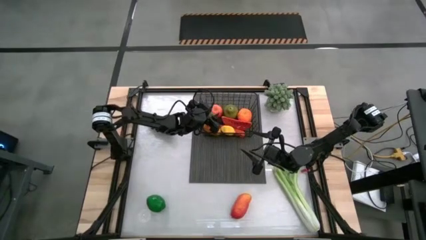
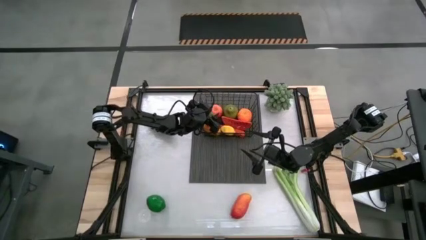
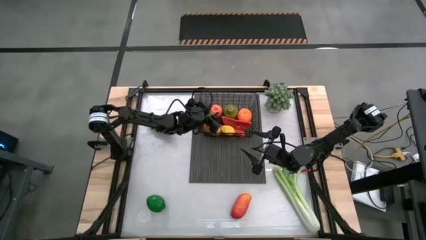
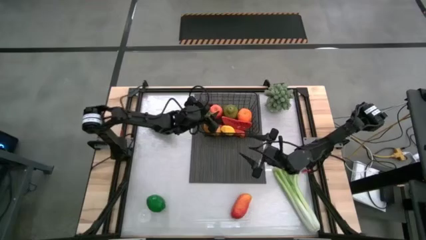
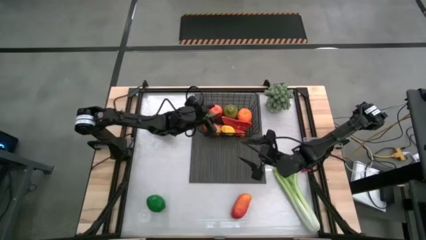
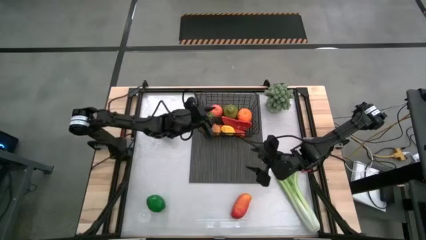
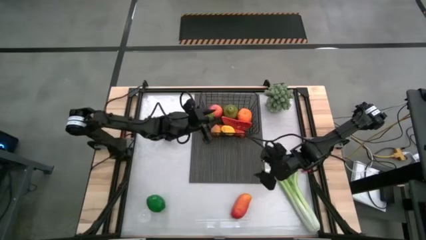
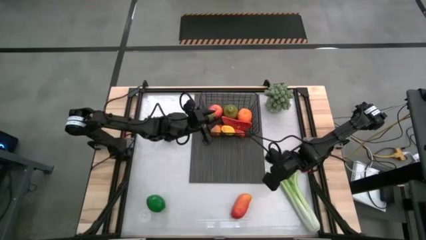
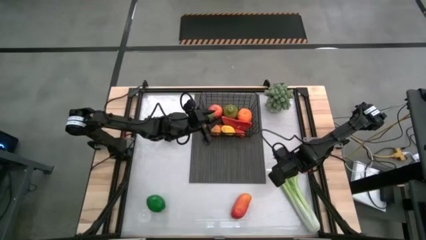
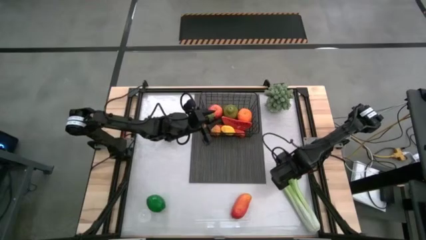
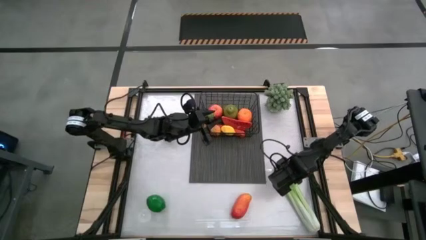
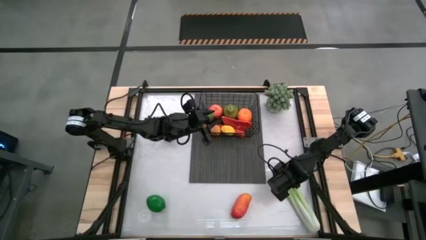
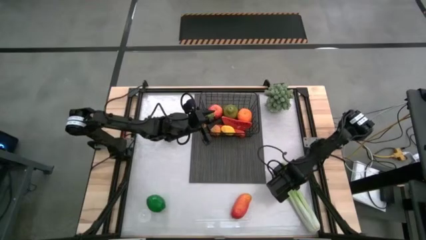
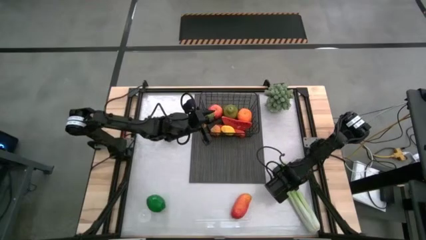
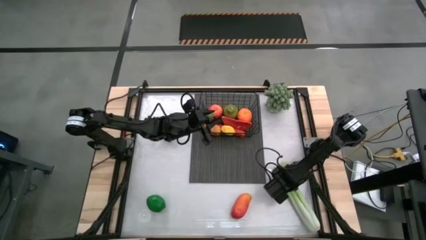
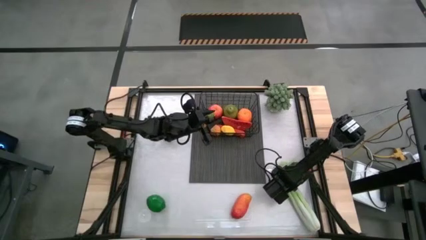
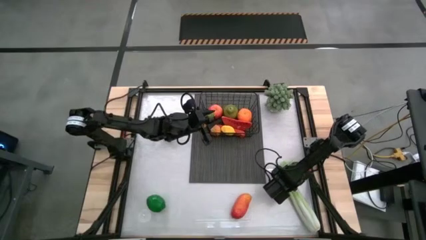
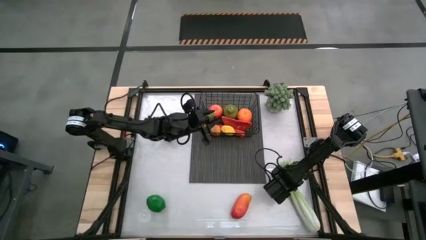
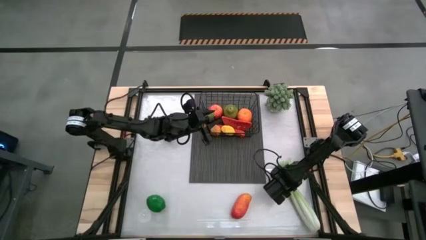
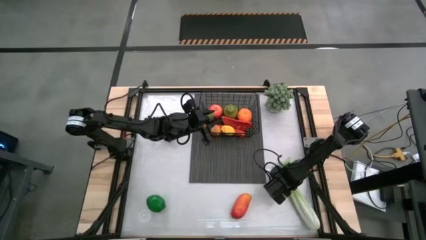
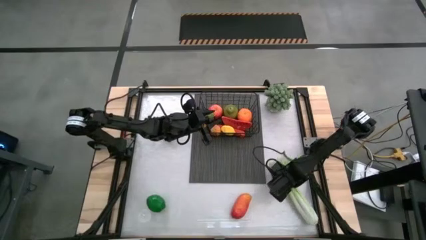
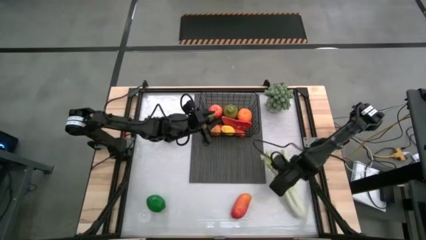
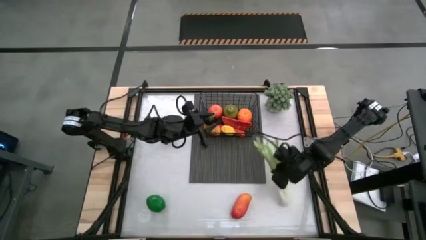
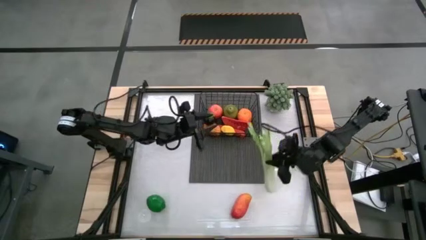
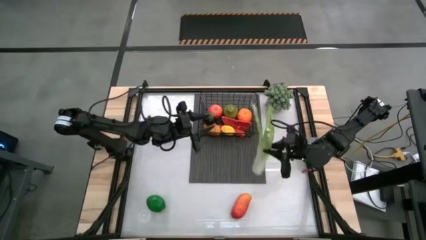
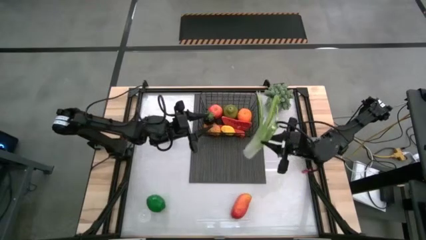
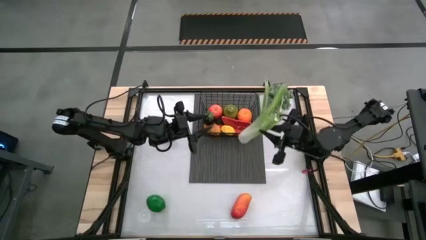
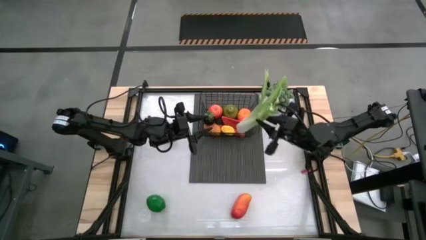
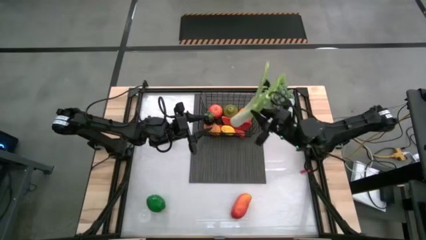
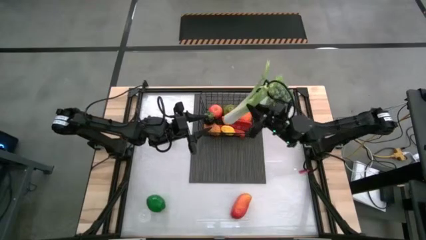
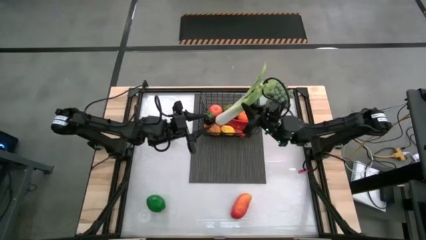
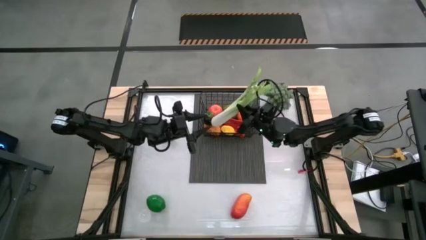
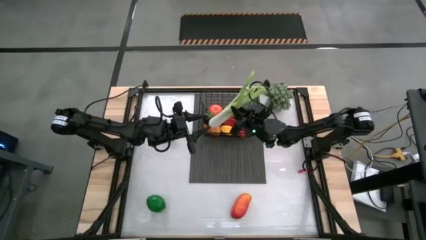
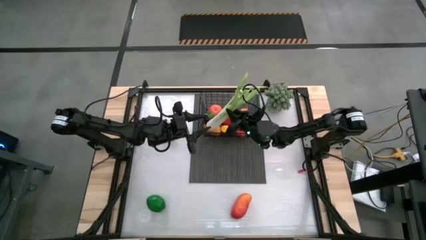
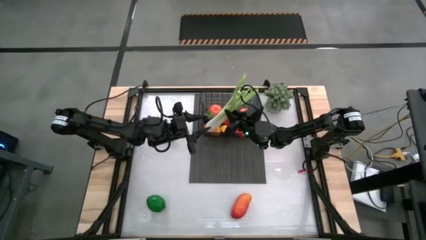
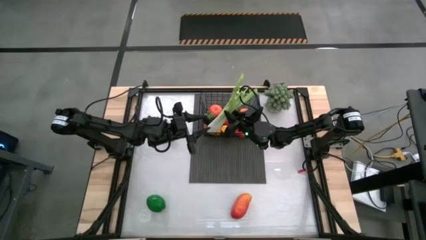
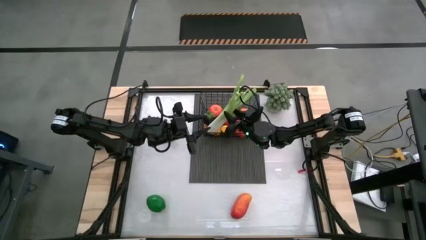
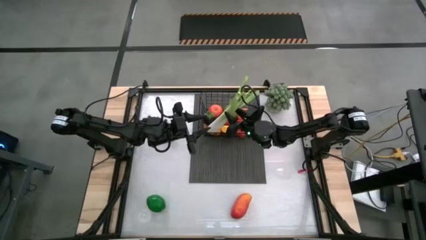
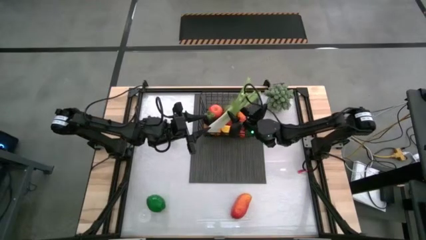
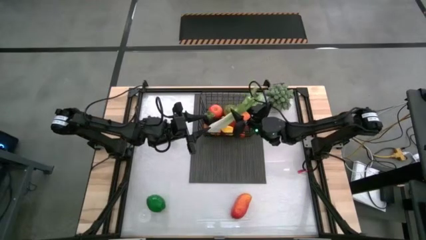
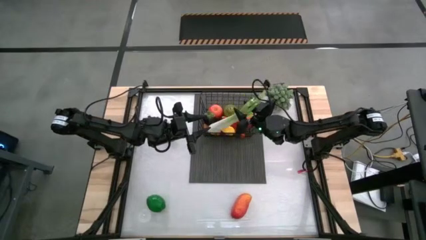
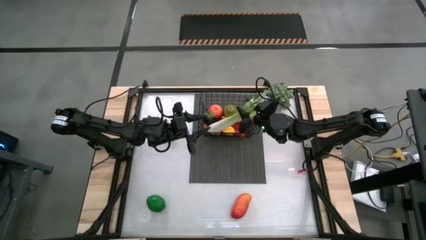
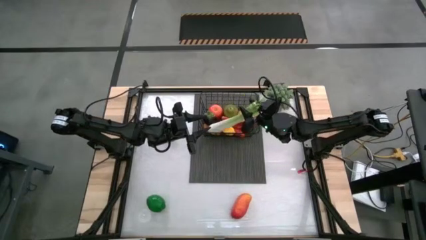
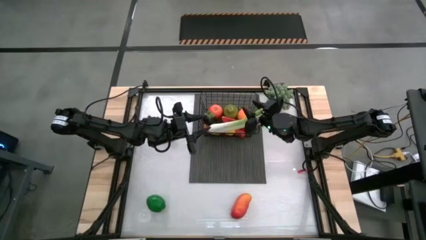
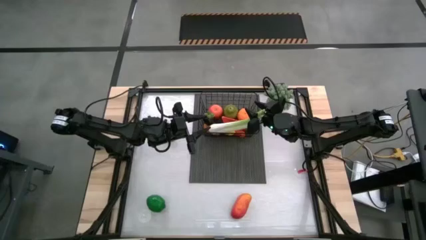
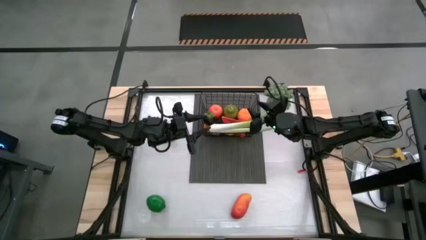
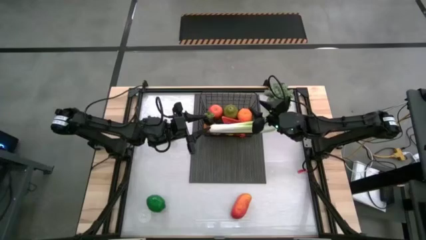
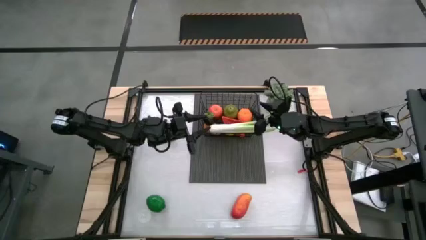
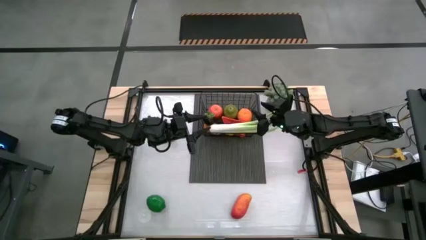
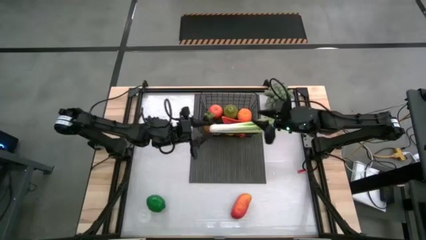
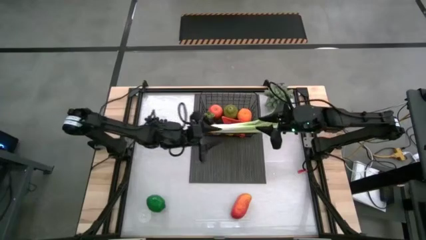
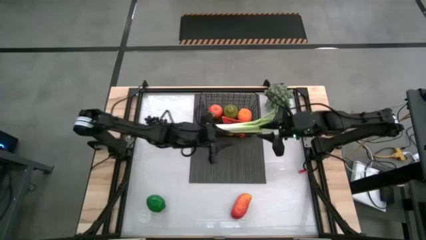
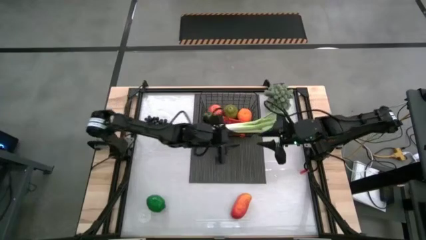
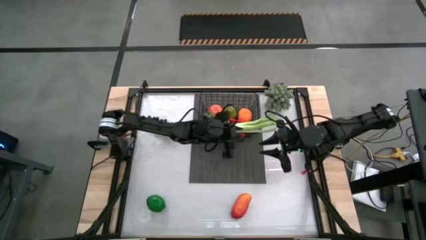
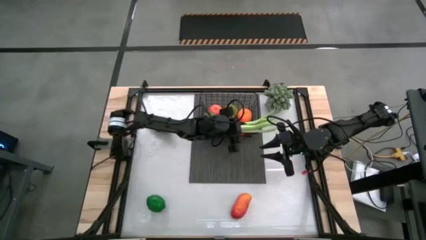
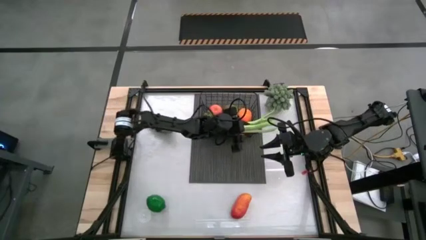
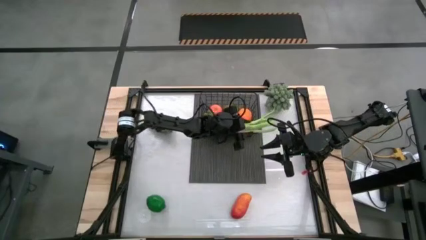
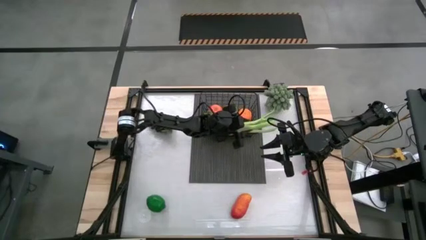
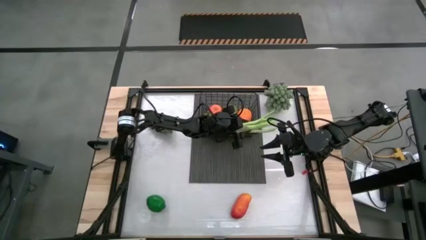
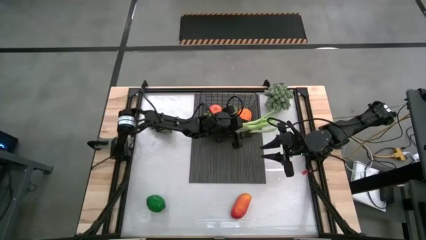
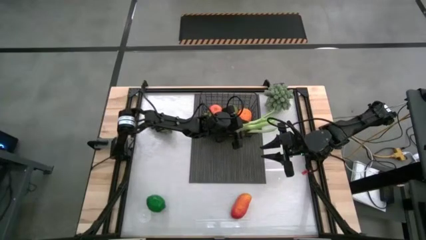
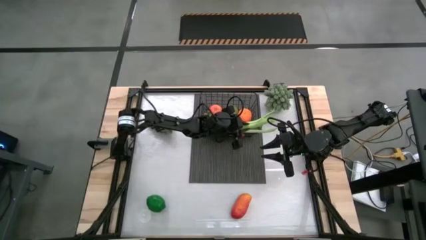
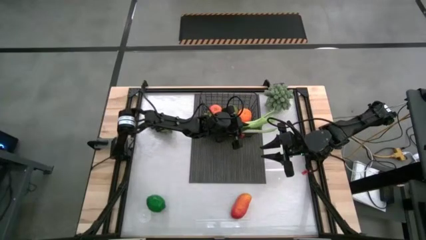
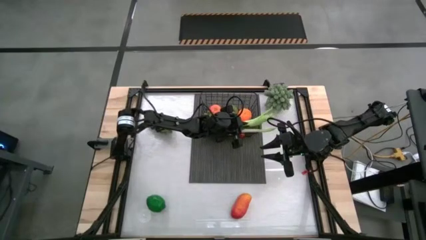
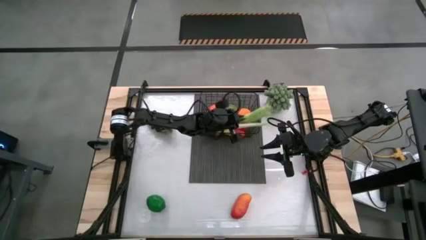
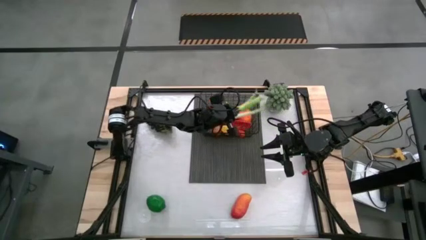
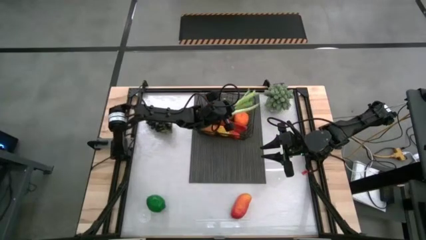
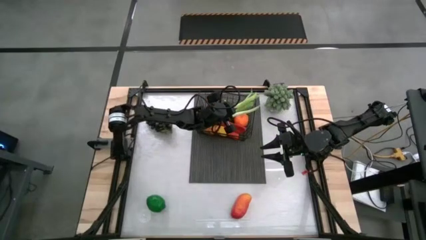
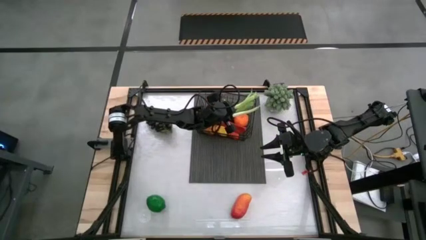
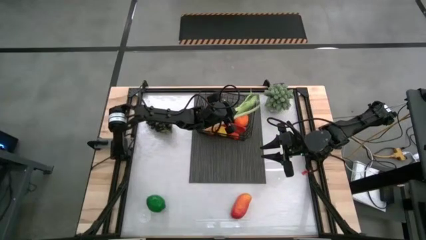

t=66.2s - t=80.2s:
Task: Build produce basket
Put the celery into the wire basket

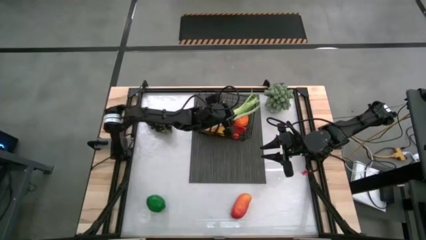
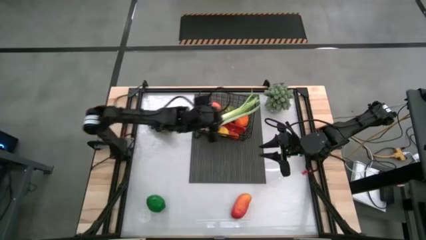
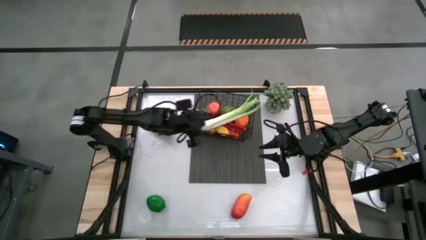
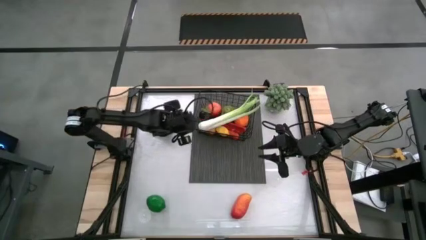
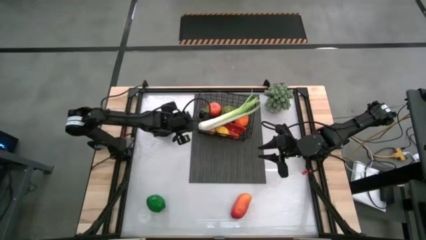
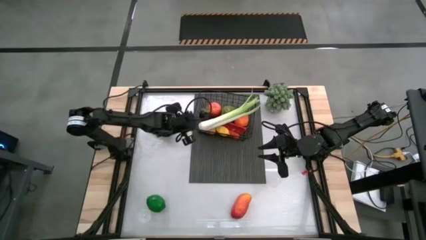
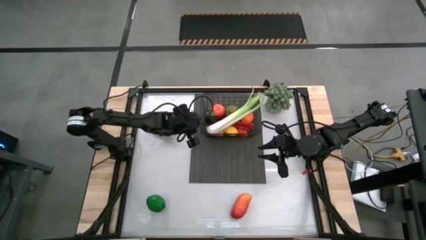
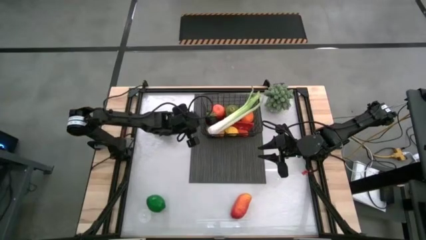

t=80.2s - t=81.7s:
Adjust the wire basket

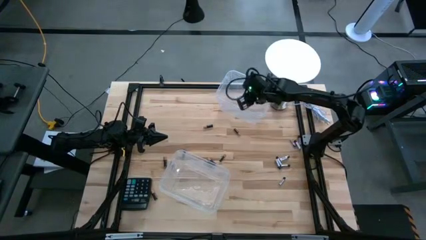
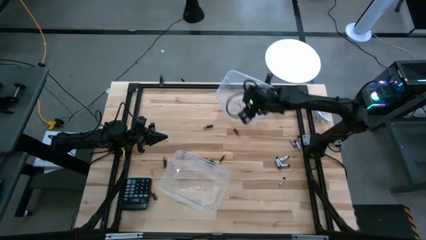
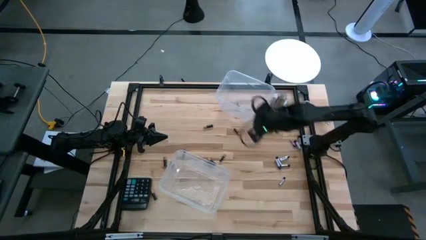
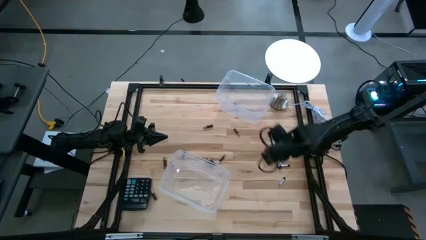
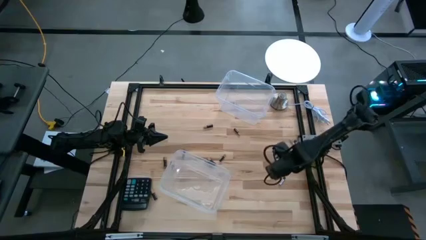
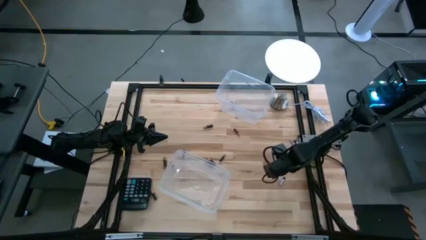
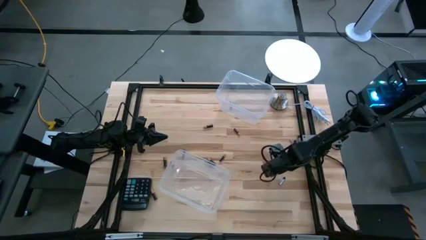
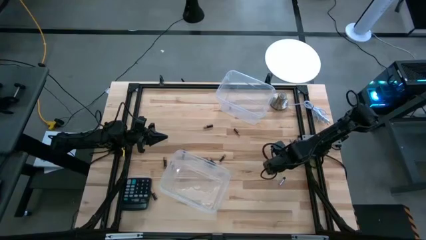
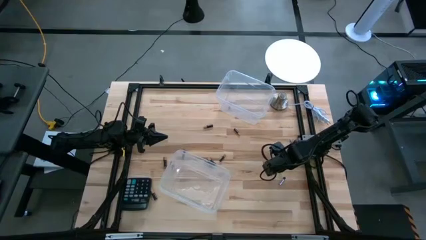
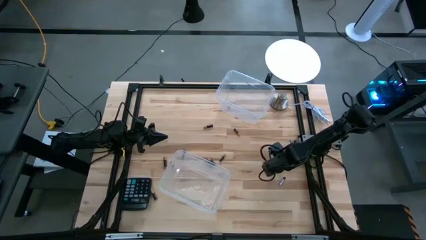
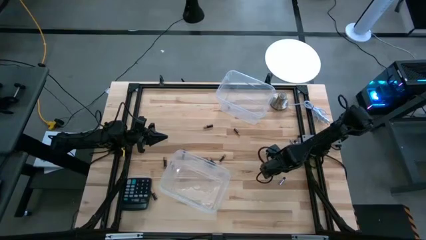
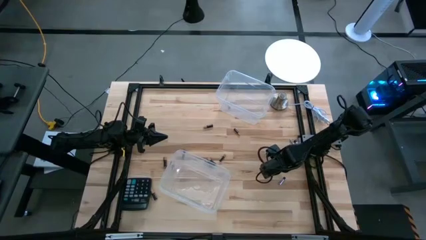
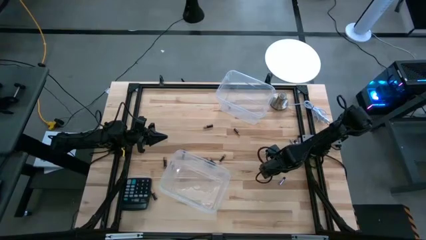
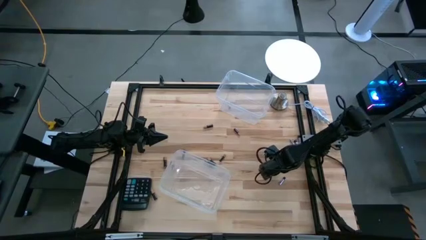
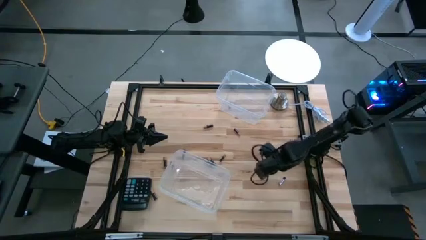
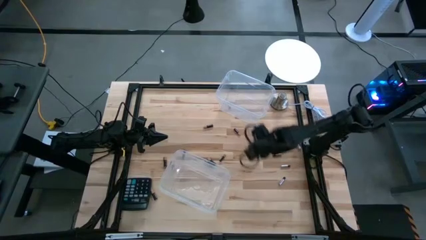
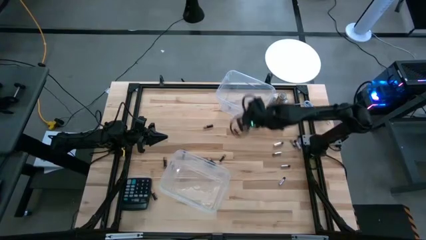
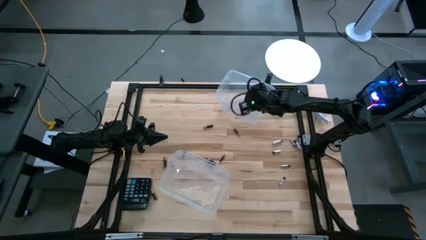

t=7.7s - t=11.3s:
Task: Sort batteries
Put the silver battery into the top transparent bin
